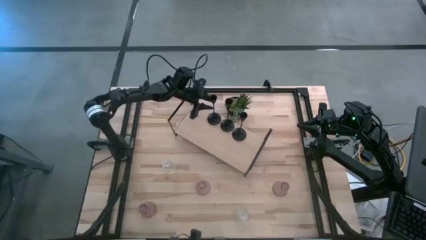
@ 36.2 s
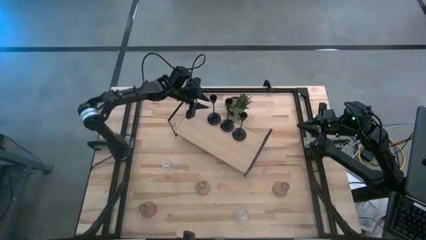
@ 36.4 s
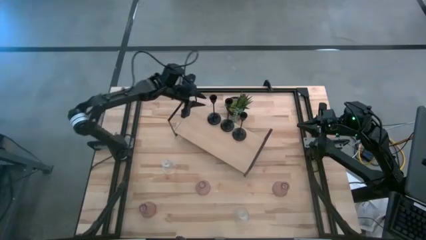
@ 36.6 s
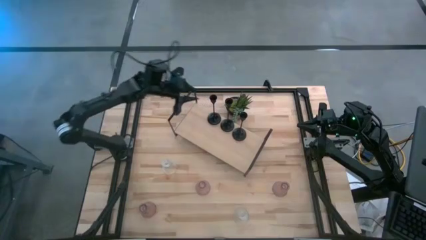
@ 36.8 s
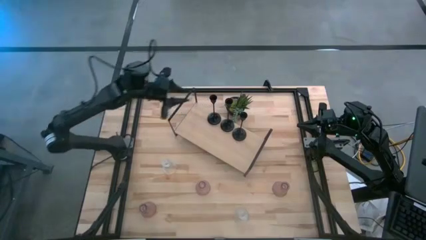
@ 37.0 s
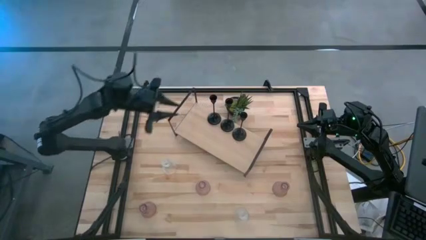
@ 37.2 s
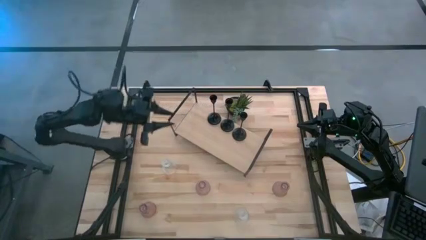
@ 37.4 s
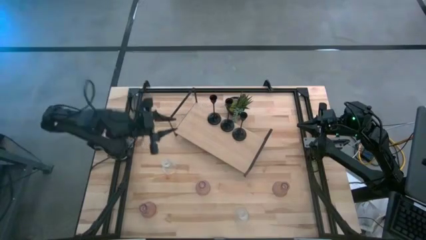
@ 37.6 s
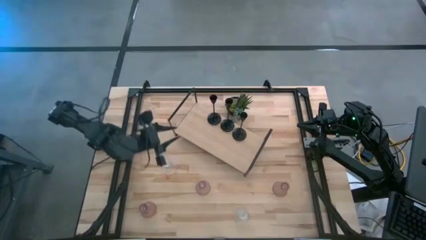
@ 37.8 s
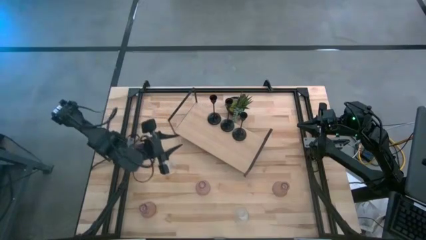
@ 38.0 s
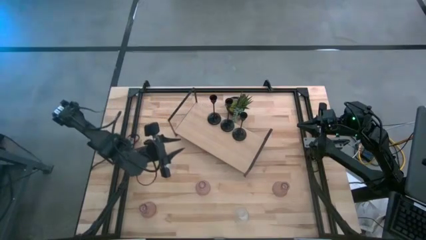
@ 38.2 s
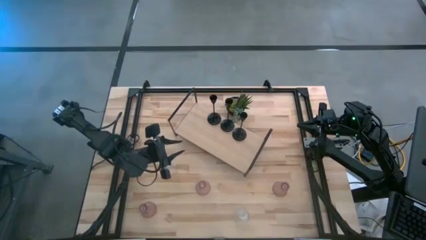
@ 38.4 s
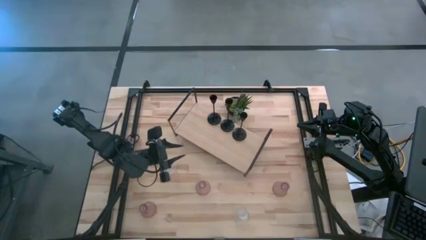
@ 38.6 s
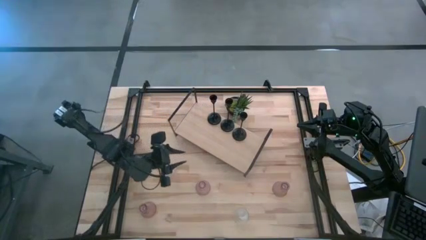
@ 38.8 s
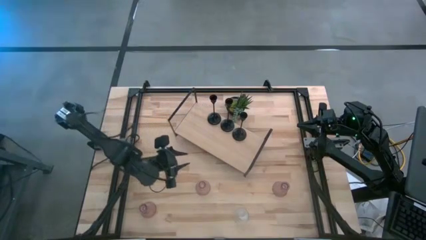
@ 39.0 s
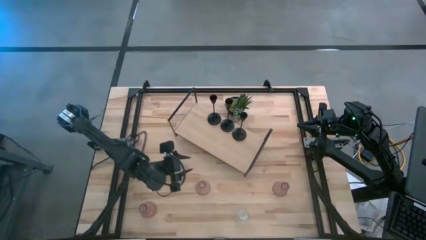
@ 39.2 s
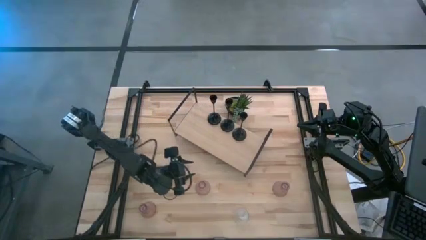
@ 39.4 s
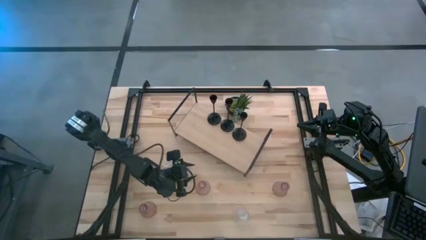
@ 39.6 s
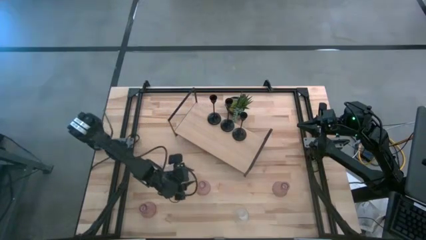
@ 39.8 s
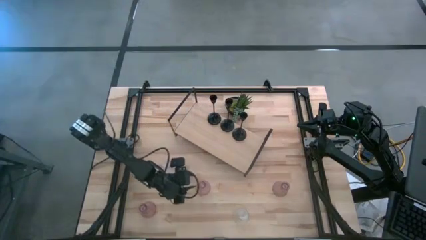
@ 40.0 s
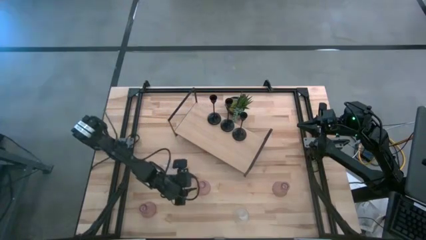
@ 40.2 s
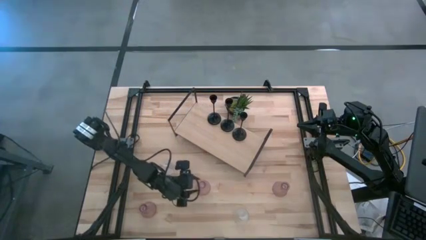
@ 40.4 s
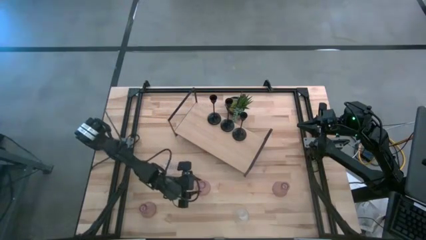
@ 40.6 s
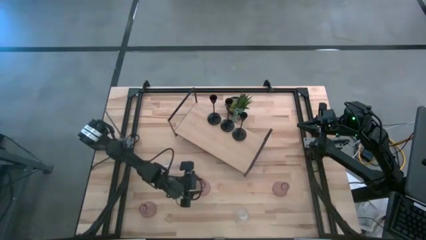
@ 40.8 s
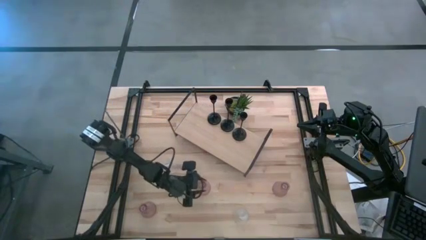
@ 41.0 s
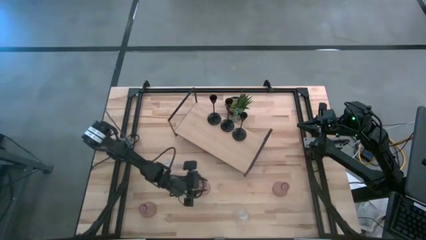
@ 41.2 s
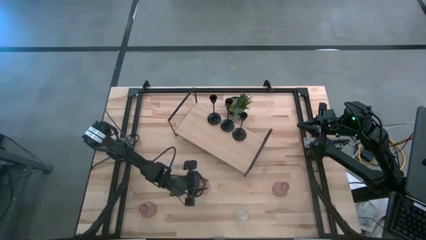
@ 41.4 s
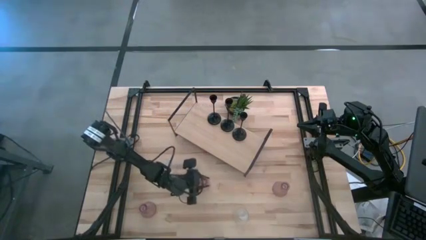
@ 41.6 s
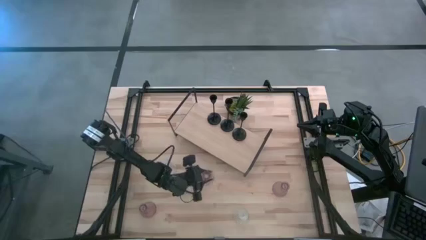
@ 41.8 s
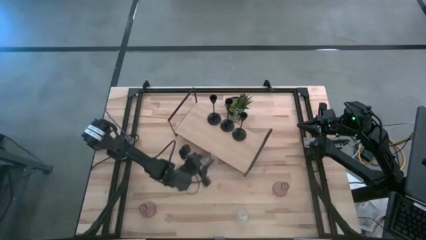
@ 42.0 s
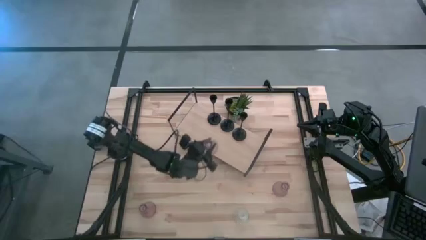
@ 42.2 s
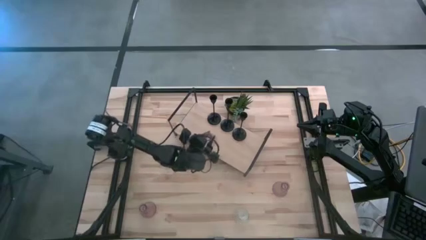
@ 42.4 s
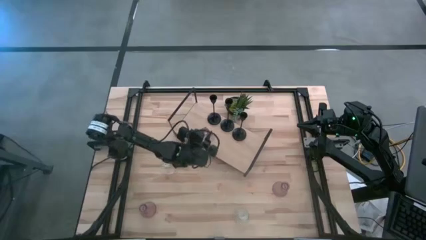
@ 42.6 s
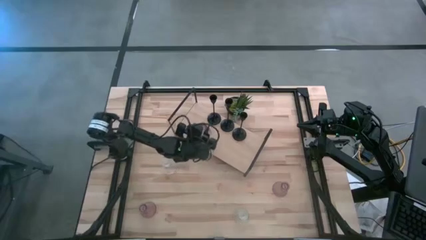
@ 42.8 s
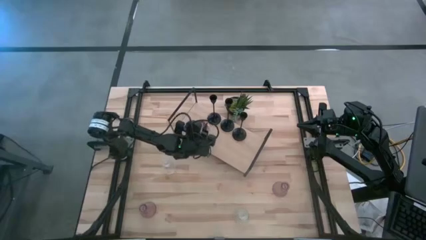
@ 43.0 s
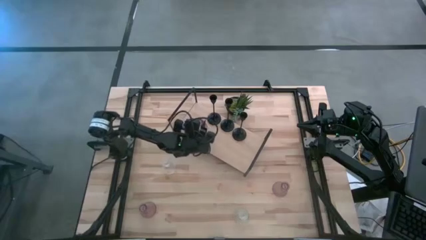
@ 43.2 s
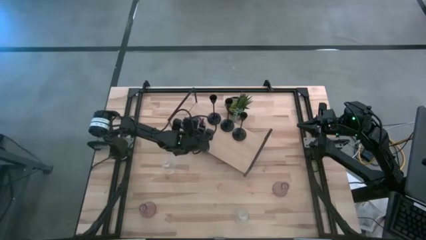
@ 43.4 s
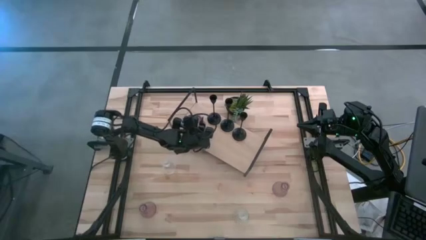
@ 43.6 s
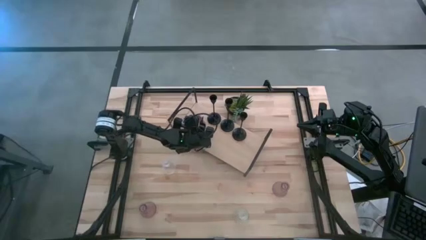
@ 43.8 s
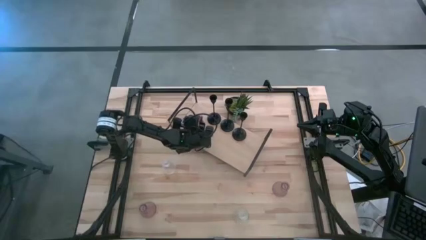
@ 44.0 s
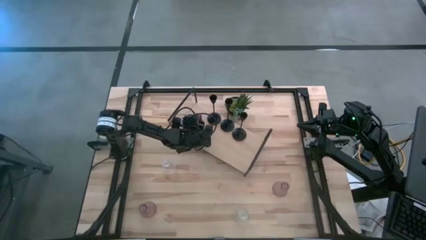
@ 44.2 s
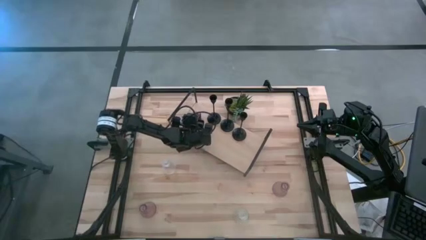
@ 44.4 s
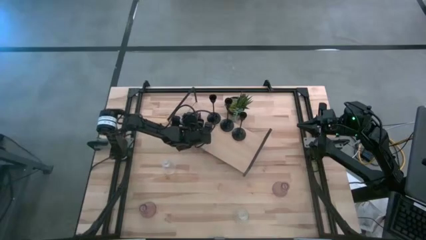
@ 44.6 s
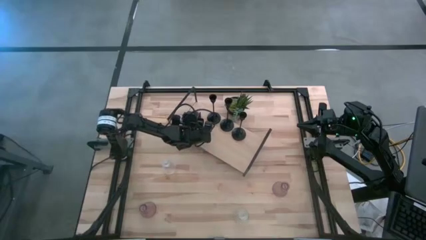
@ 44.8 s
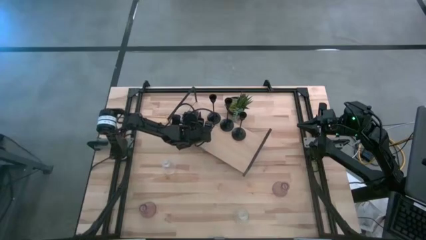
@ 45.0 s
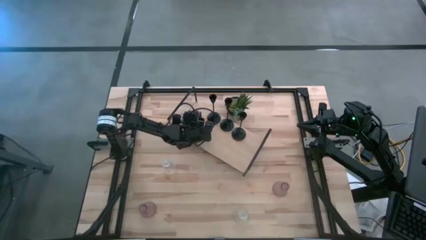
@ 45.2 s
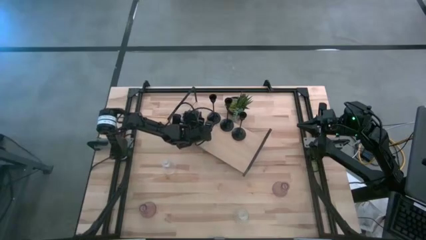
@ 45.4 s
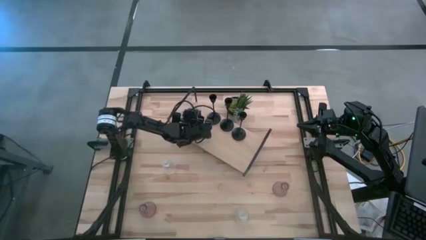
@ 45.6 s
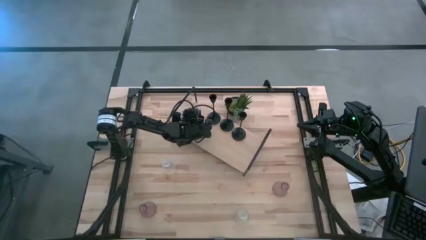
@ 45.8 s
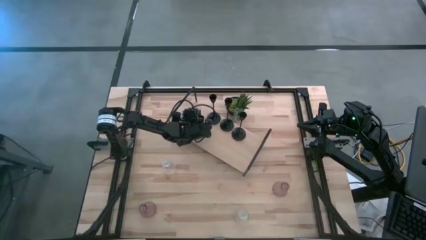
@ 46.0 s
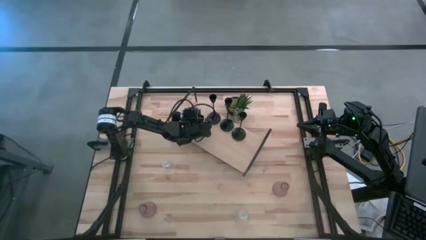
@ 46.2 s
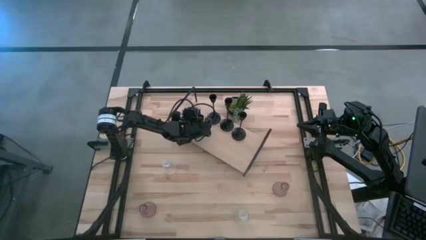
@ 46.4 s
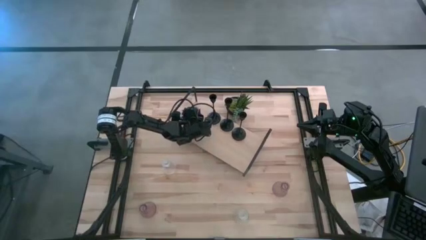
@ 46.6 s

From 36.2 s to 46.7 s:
Task: Pick & Place candle stick holders
Put the middle pink glass candle holder on the shelf

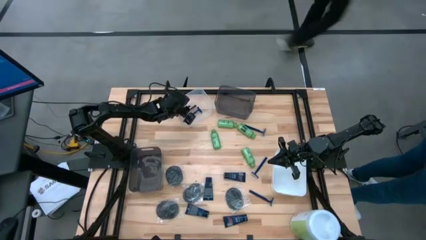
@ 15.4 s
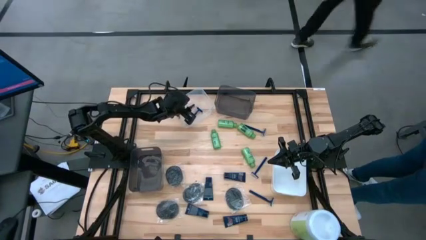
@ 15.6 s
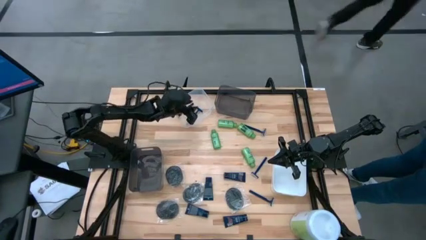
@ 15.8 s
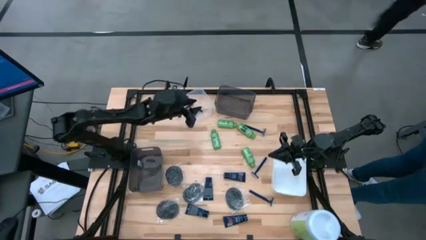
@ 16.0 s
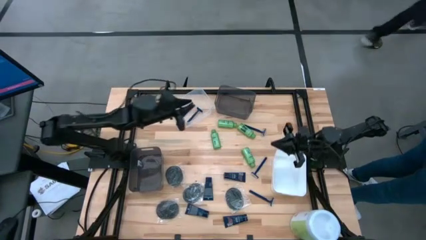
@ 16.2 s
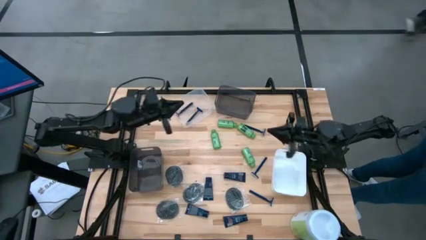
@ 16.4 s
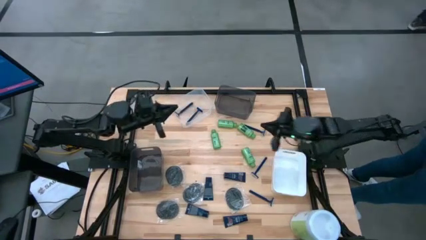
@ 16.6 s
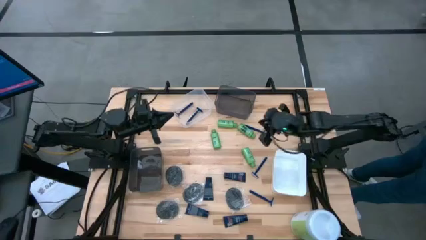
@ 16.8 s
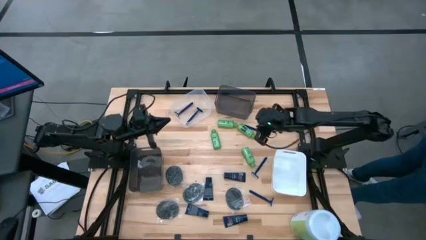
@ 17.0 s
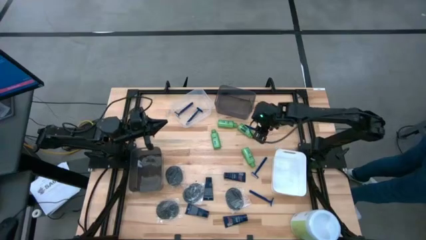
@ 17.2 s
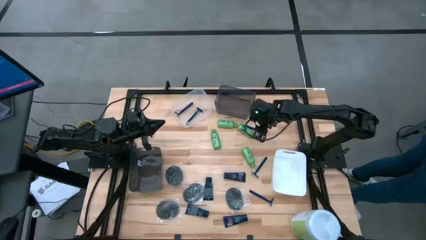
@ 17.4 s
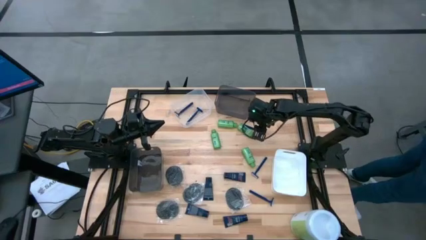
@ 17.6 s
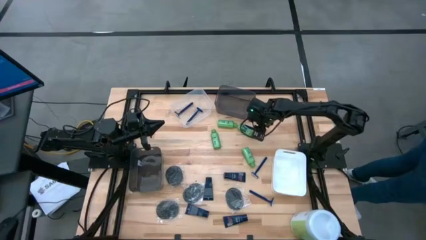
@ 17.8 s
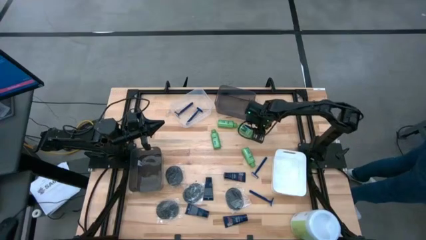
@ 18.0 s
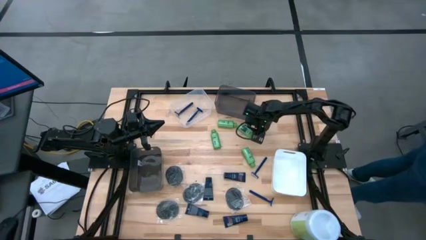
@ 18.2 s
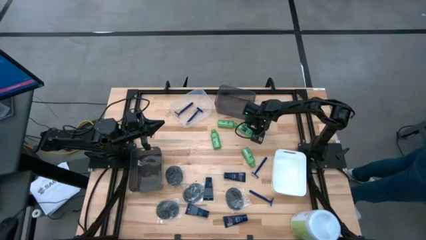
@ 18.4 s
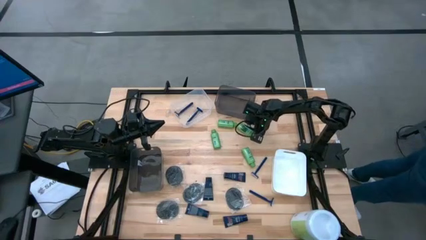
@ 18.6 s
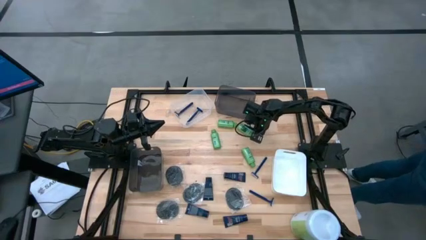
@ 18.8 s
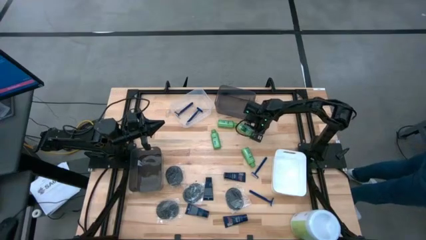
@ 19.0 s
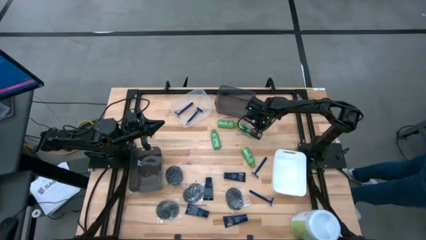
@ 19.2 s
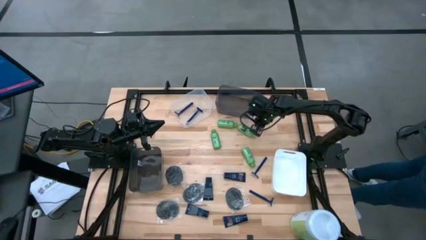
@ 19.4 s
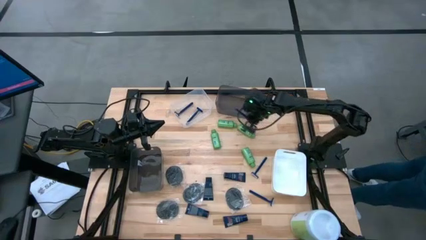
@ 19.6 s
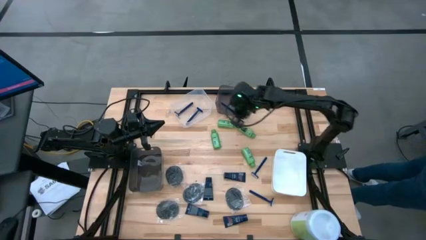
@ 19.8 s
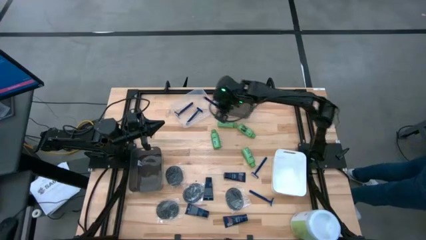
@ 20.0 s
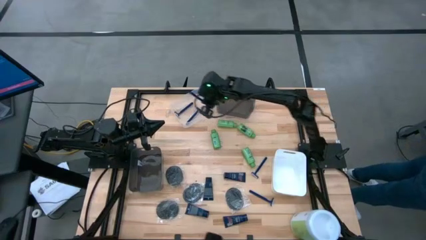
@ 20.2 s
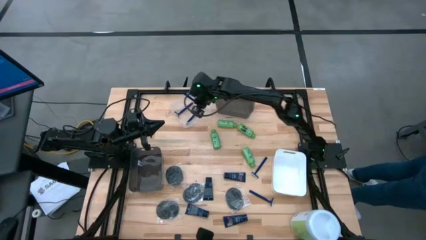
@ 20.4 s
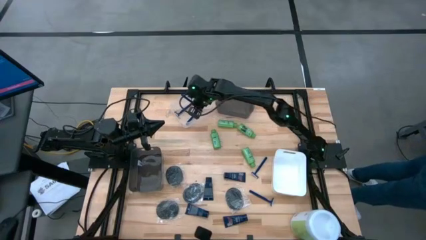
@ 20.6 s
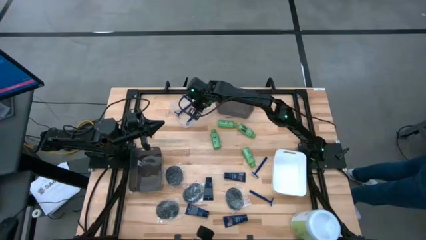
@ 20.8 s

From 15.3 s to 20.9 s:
Task: Pick & Place Travel size toiletries
Put the blue razor into the white transparent bin
